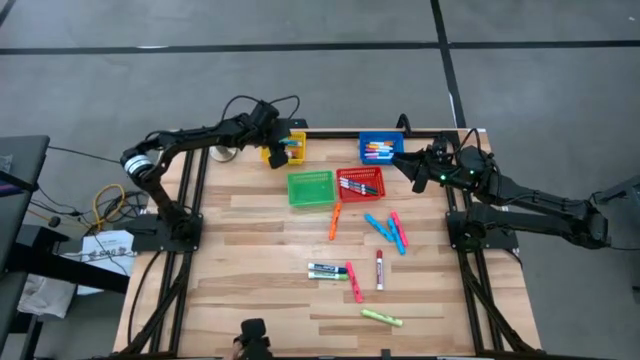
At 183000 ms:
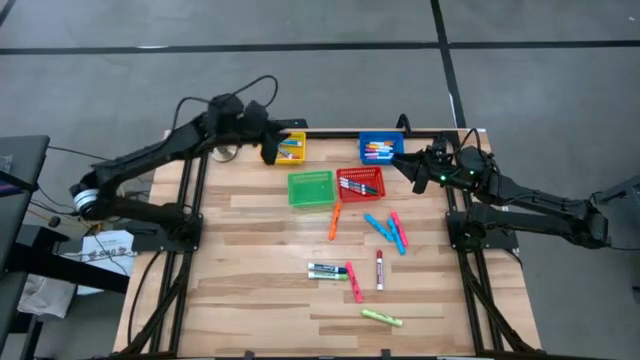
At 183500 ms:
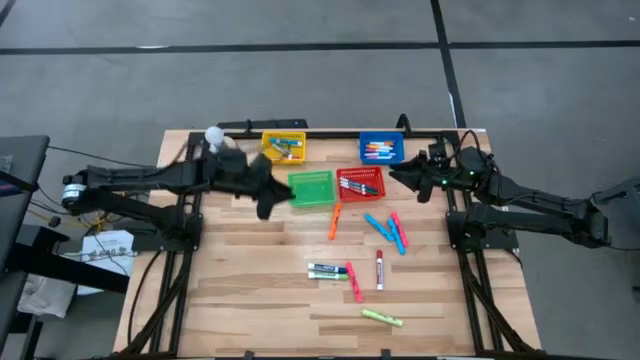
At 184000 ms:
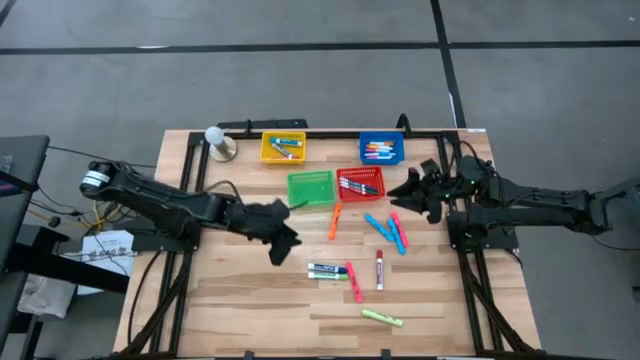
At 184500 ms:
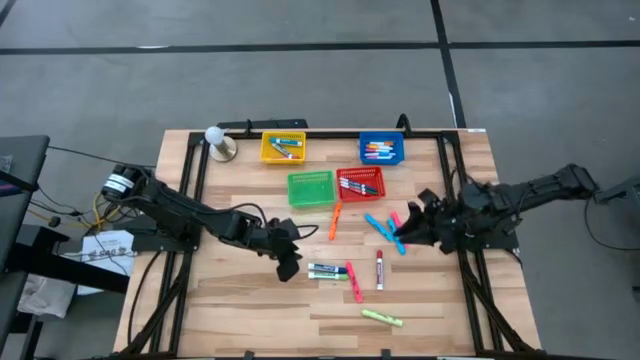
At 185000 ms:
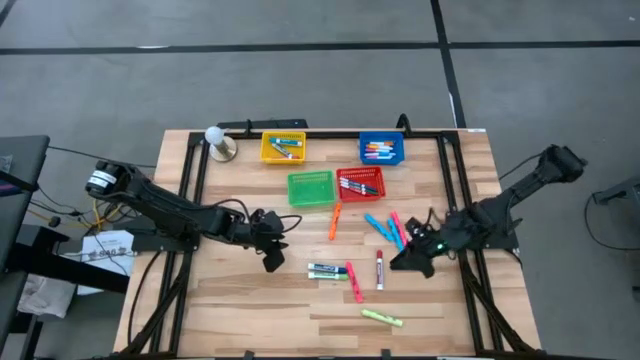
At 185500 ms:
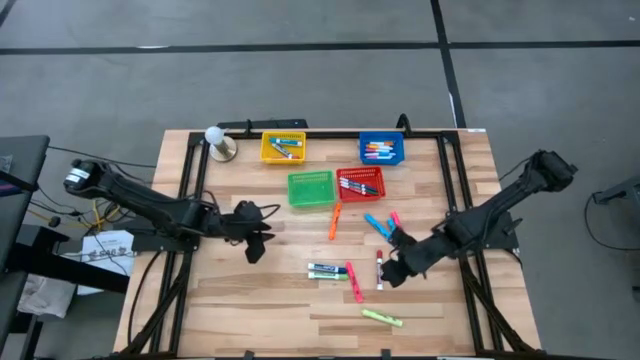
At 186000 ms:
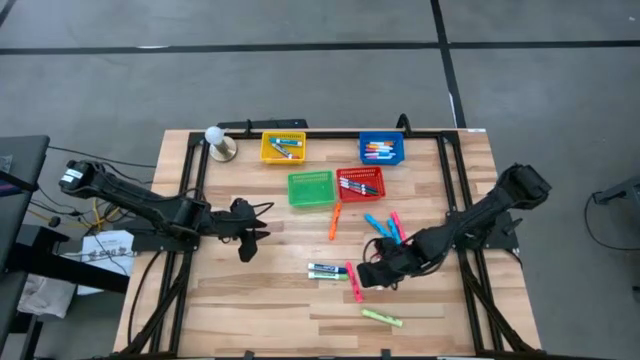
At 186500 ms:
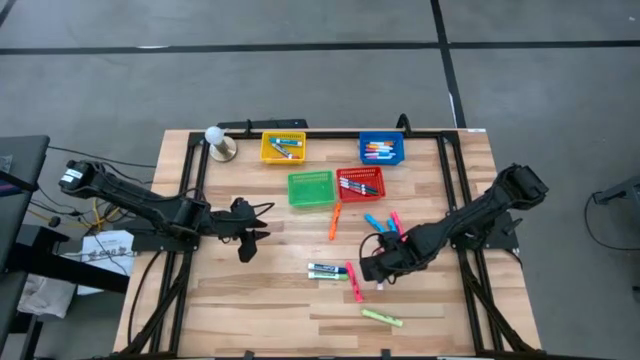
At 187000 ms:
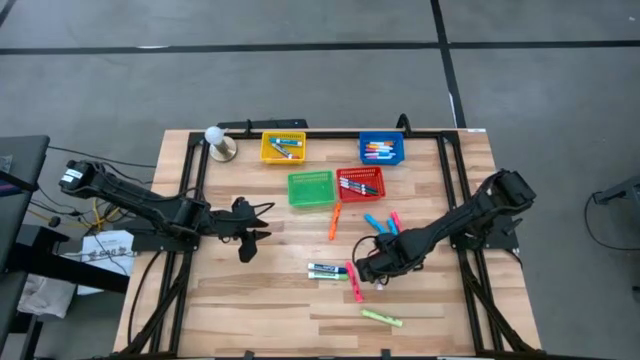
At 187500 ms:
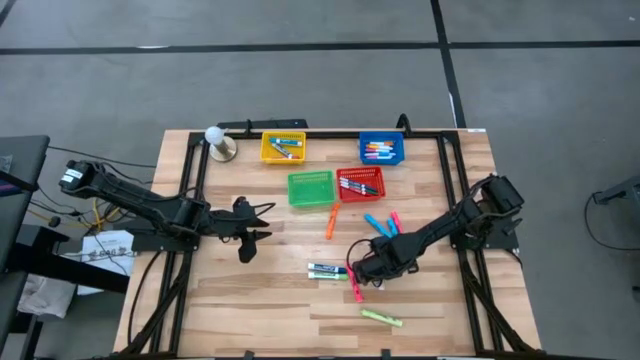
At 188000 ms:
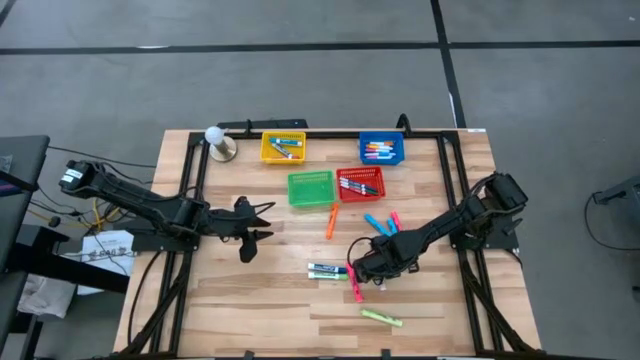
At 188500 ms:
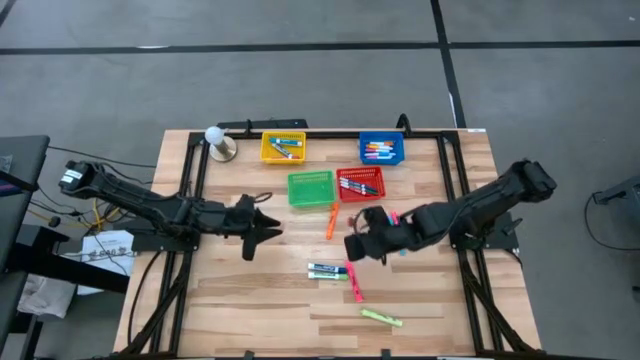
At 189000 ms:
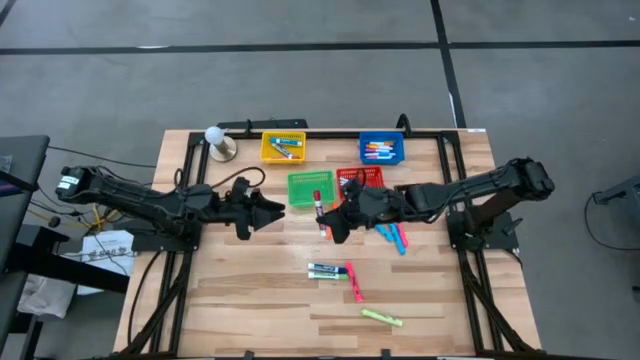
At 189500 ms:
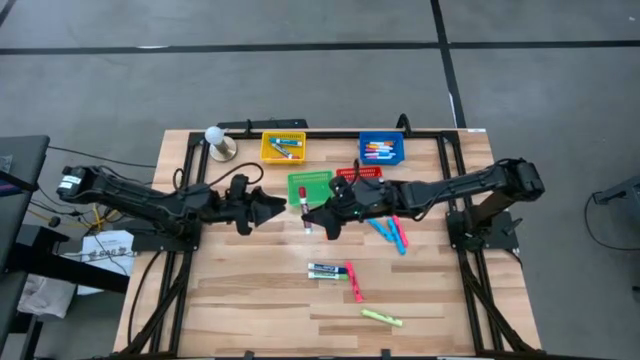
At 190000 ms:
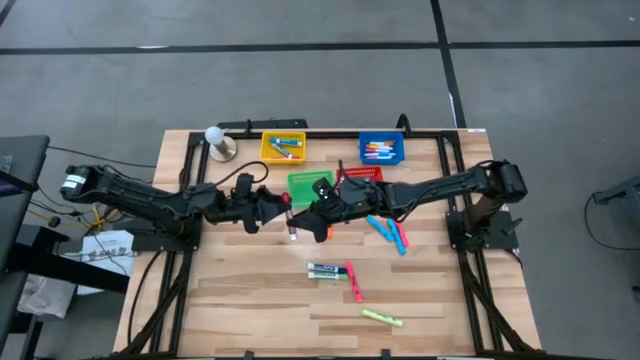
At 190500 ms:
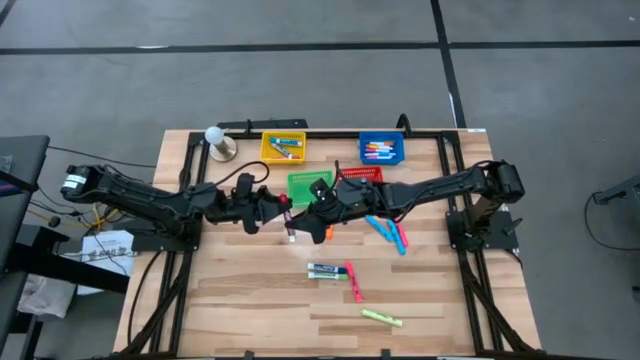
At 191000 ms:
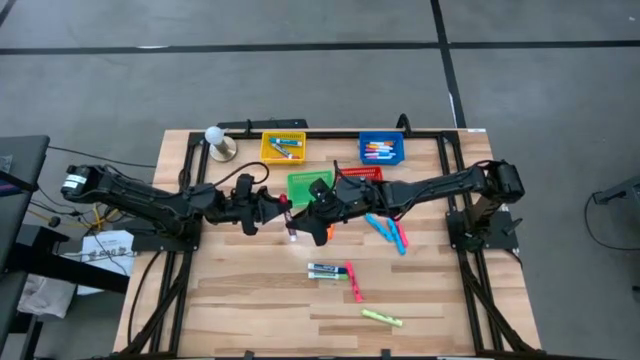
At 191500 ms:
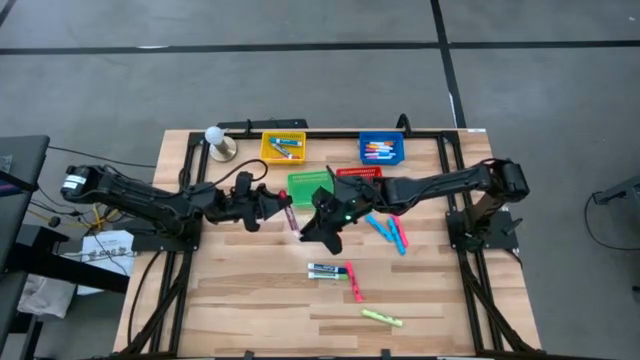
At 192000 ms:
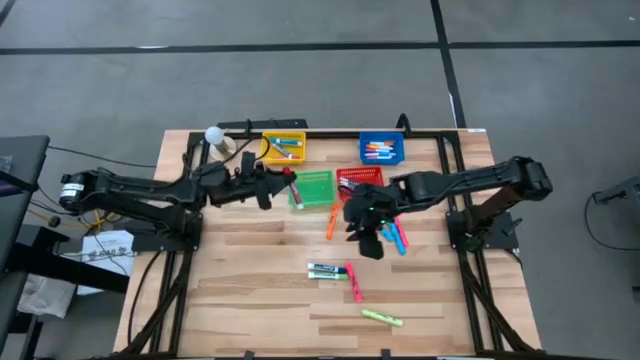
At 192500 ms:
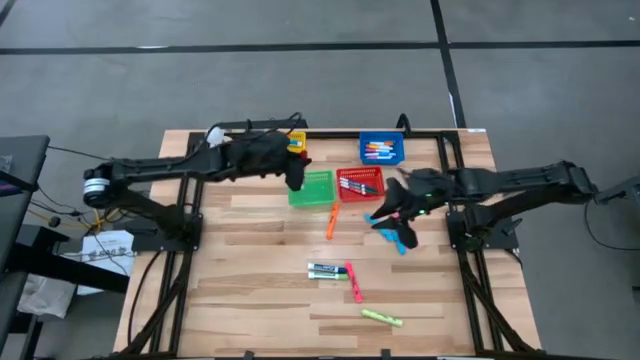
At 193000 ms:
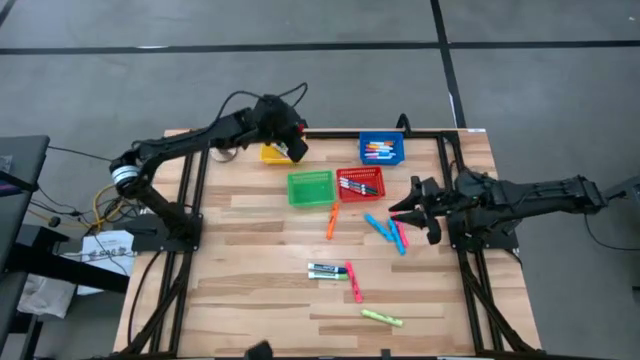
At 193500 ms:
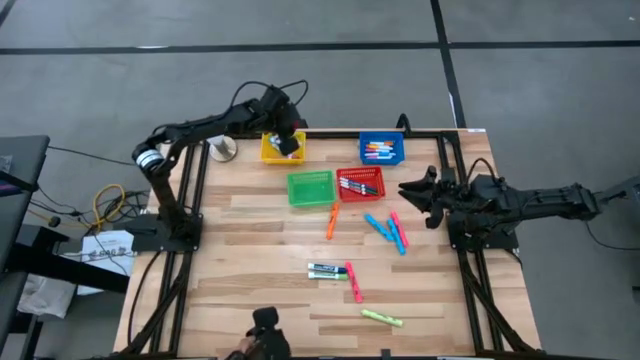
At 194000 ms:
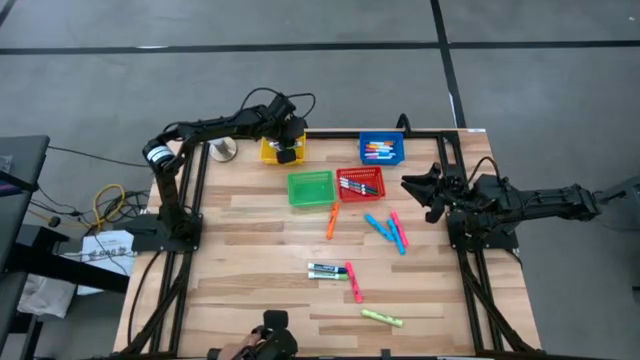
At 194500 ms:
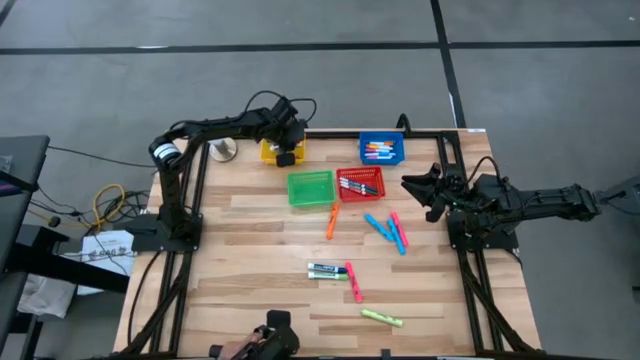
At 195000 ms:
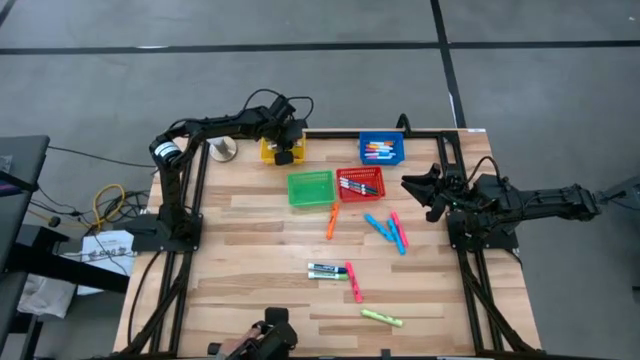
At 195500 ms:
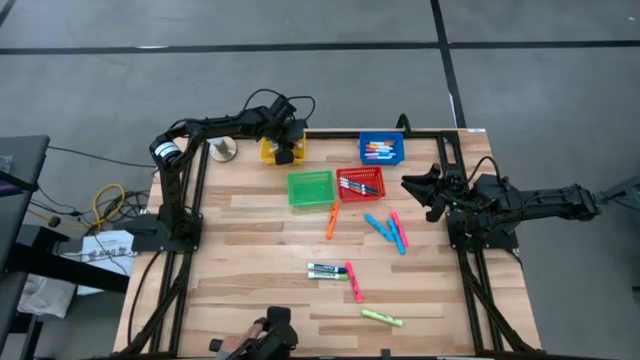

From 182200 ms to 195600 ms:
Task: Pick & Place Markers
Put the large red marker pen into the yellow bin

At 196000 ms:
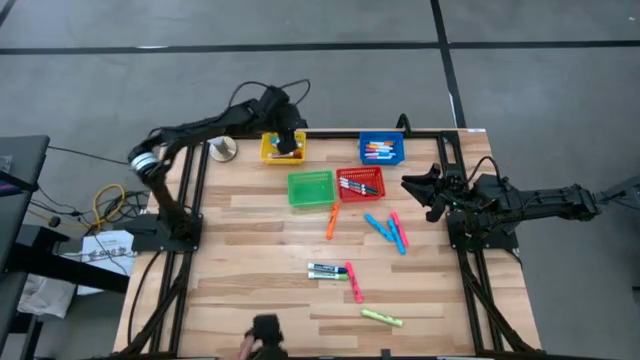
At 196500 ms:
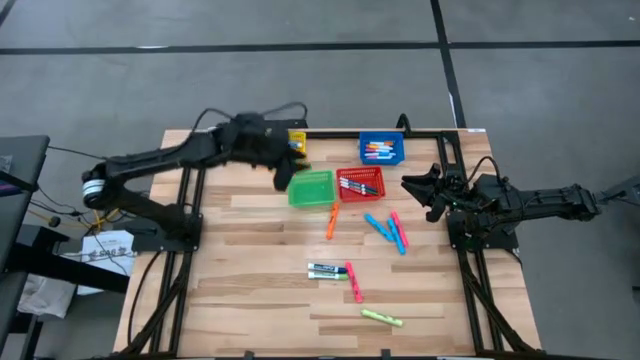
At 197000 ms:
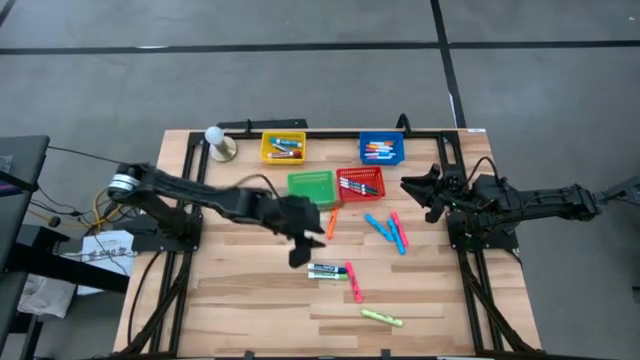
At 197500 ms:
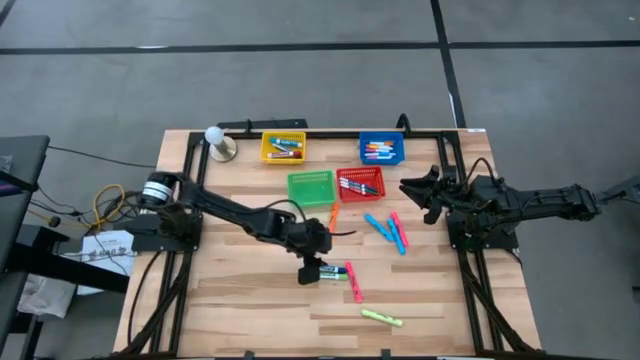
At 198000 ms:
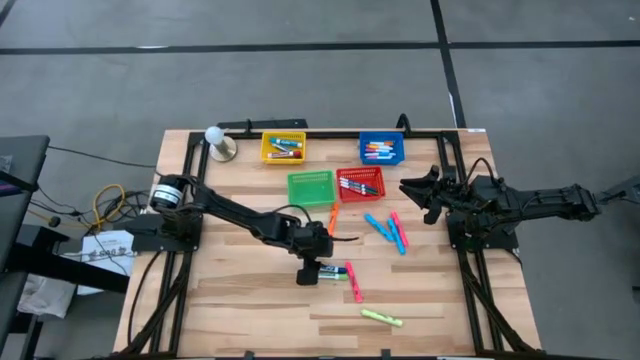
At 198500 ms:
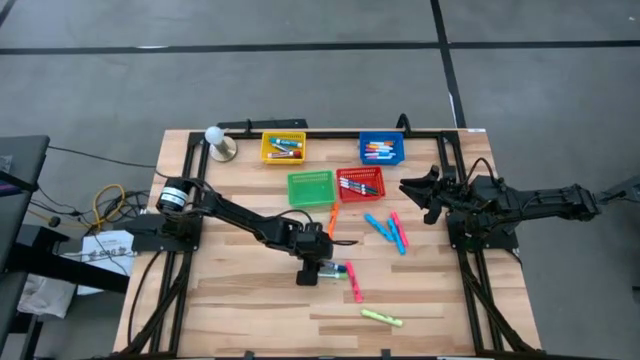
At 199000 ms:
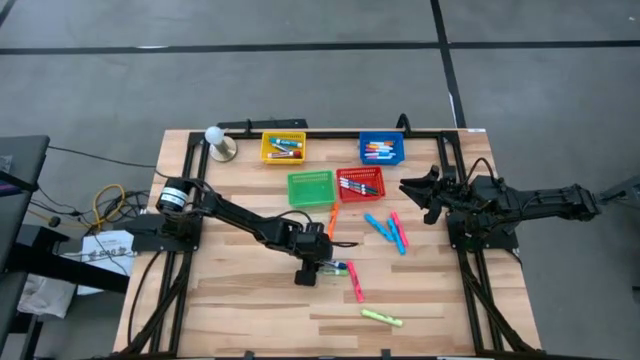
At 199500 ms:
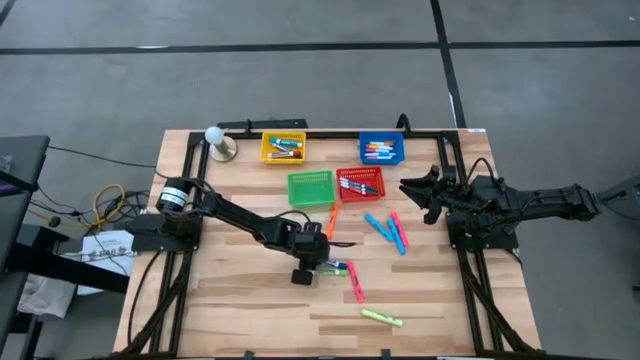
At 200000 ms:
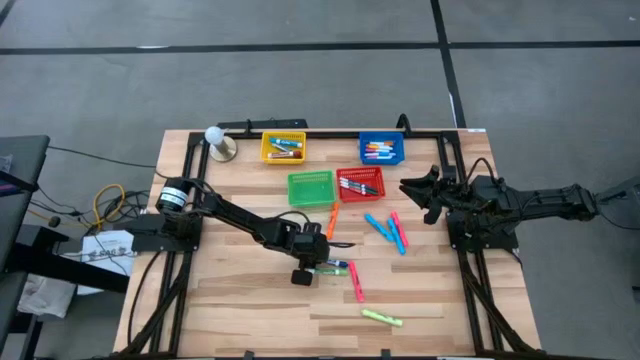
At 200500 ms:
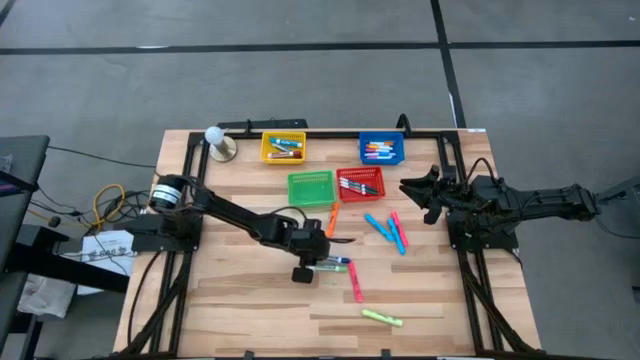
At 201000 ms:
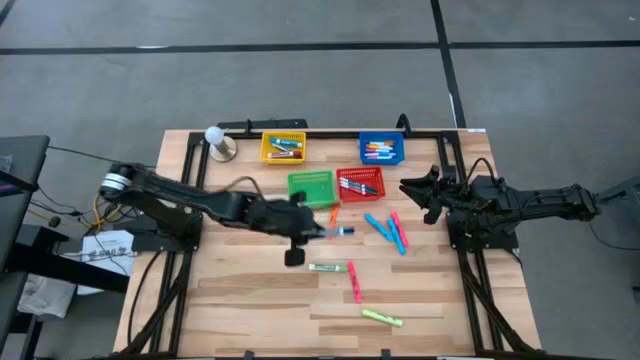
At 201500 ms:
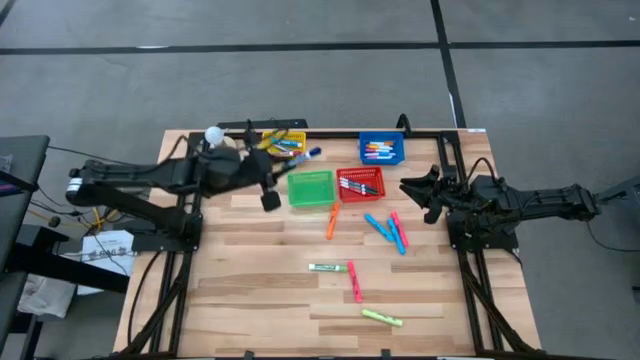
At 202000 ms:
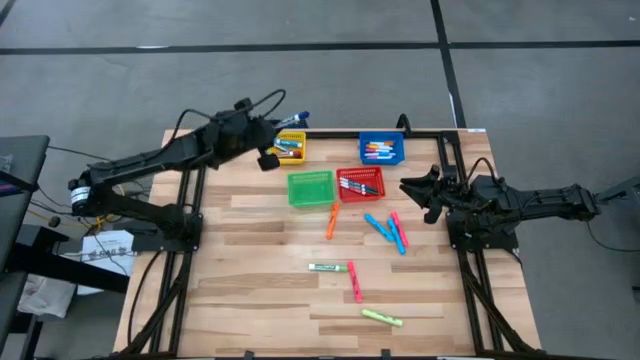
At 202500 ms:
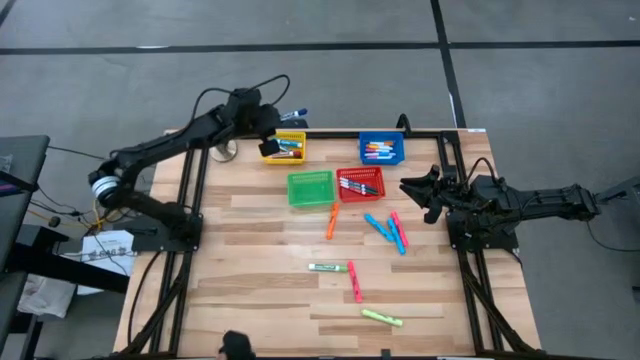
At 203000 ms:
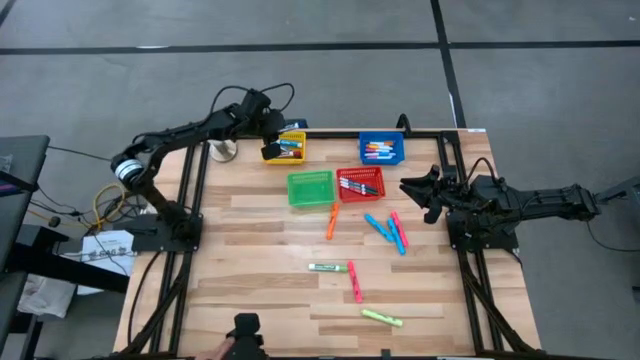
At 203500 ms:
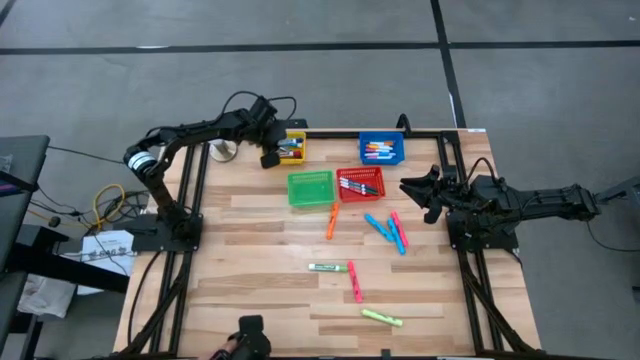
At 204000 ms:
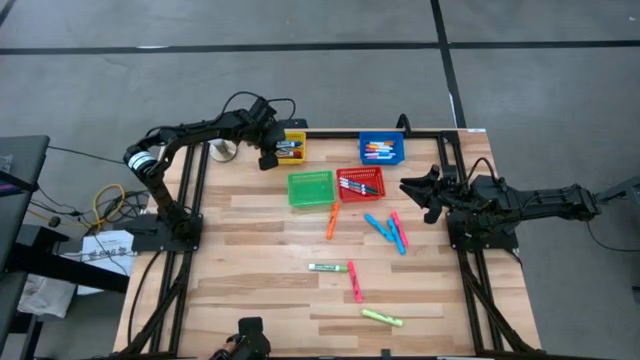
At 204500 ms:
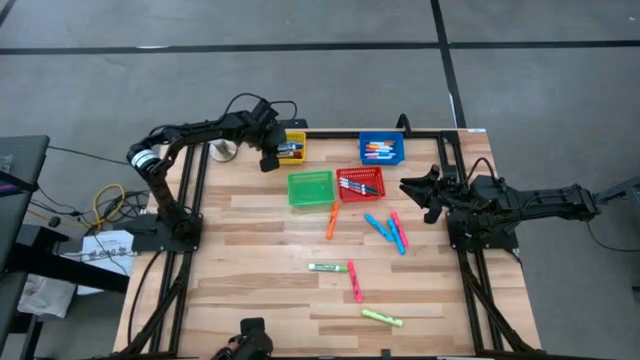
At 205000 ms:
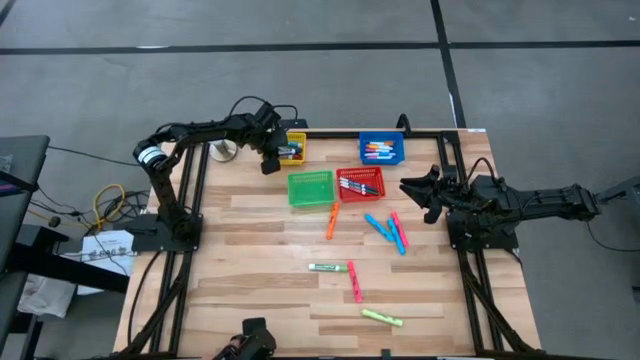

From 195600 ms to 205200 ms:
Put the blue marker pen into the yellow bin
